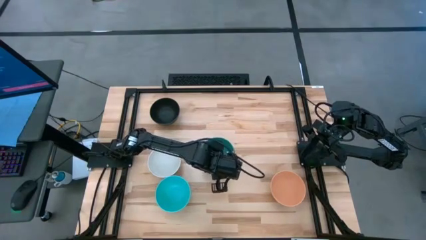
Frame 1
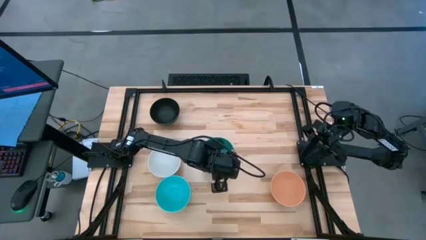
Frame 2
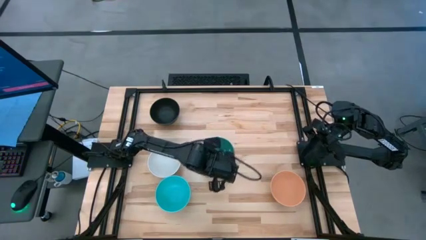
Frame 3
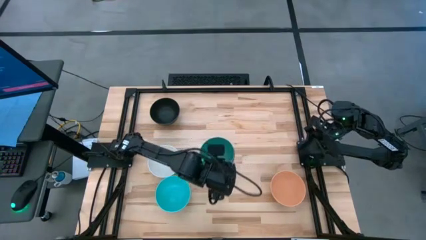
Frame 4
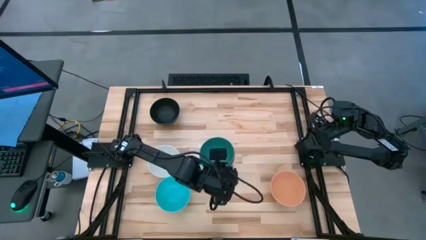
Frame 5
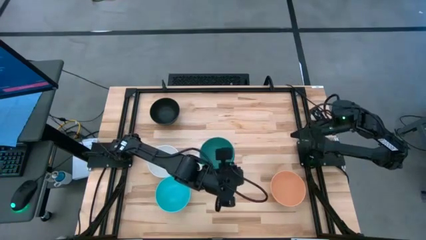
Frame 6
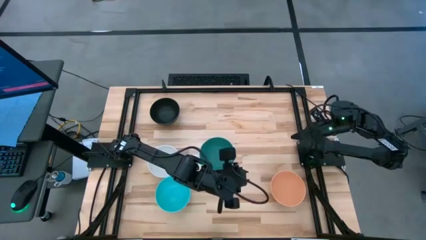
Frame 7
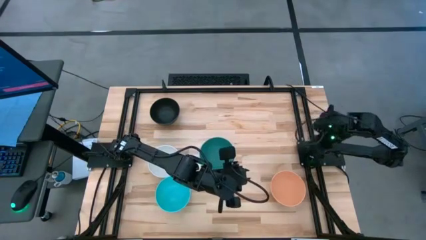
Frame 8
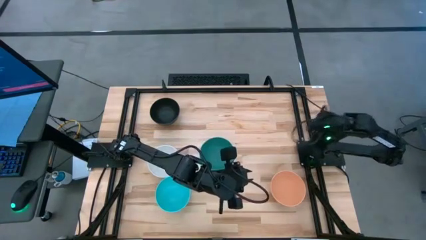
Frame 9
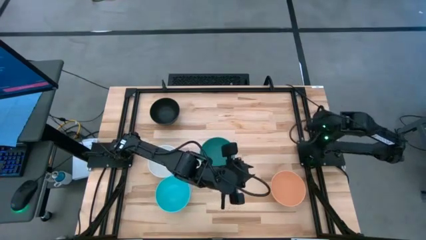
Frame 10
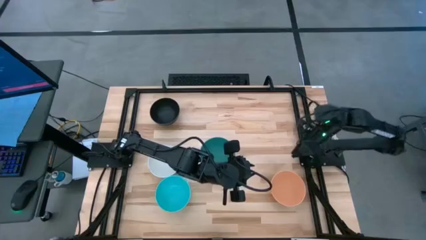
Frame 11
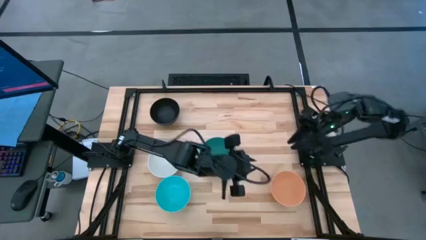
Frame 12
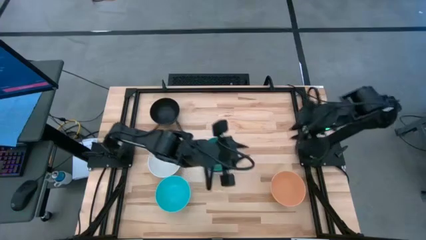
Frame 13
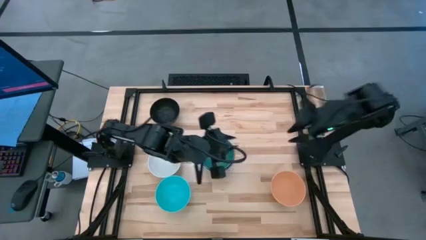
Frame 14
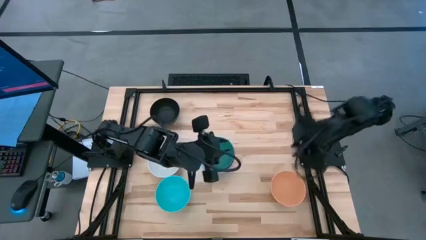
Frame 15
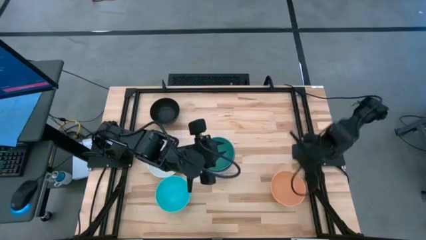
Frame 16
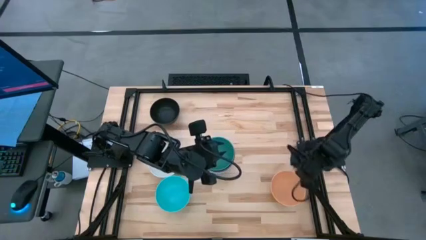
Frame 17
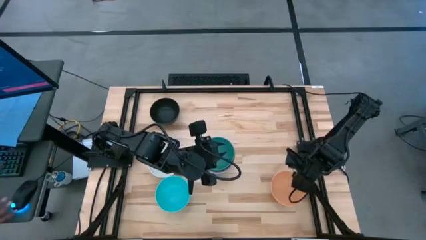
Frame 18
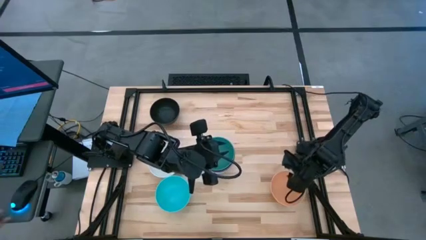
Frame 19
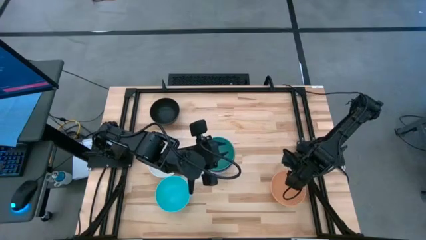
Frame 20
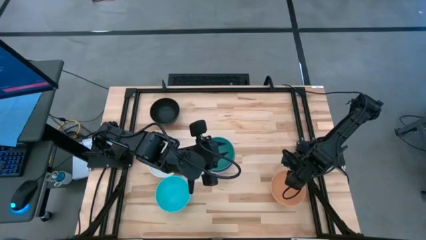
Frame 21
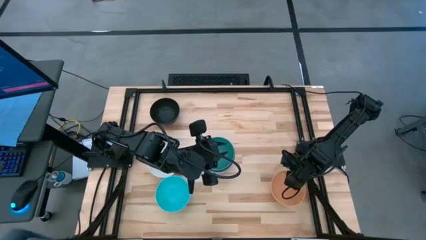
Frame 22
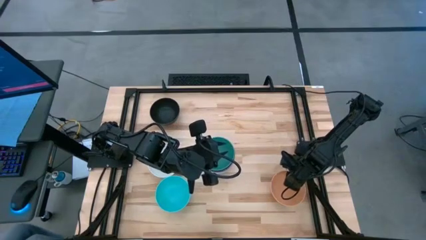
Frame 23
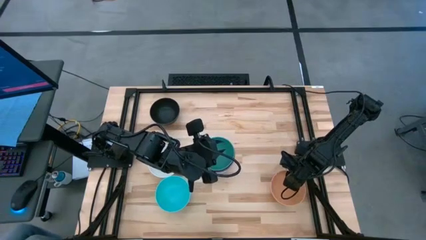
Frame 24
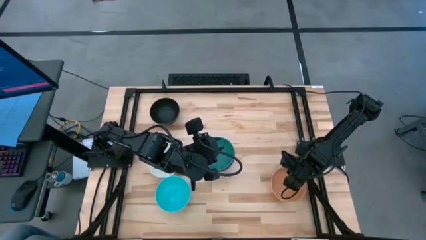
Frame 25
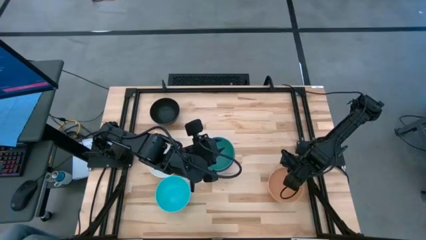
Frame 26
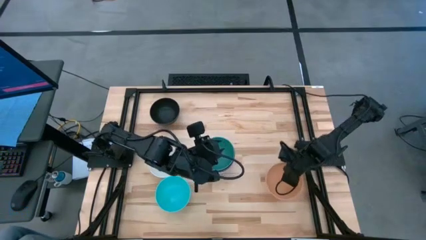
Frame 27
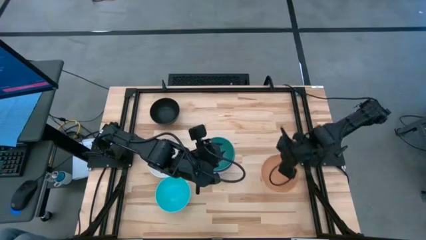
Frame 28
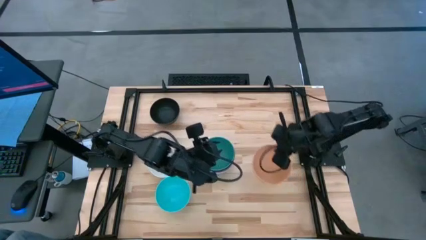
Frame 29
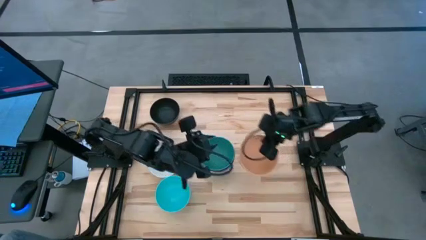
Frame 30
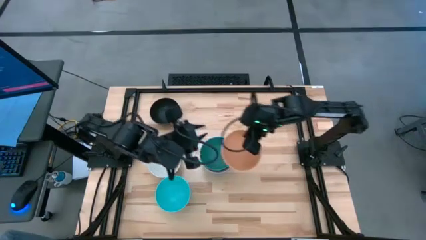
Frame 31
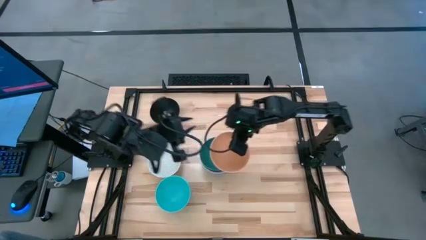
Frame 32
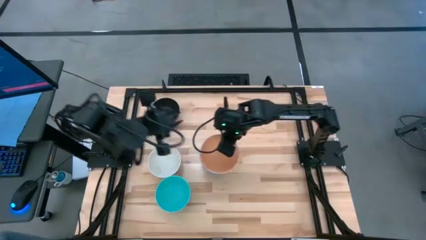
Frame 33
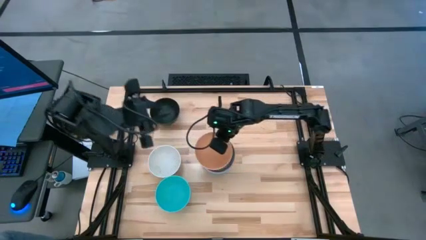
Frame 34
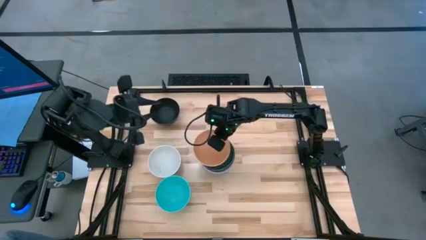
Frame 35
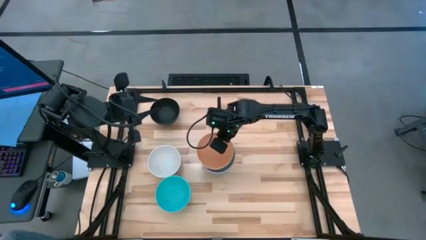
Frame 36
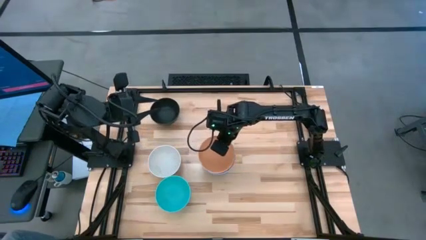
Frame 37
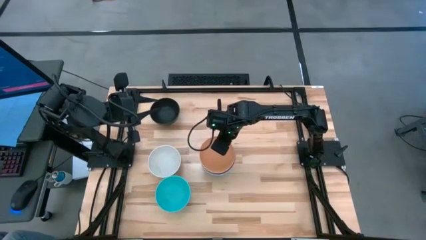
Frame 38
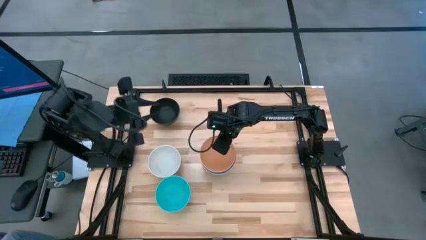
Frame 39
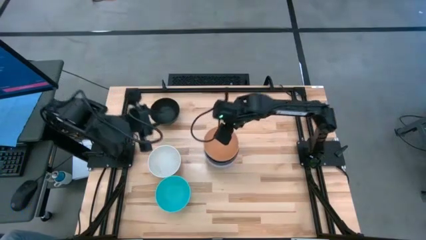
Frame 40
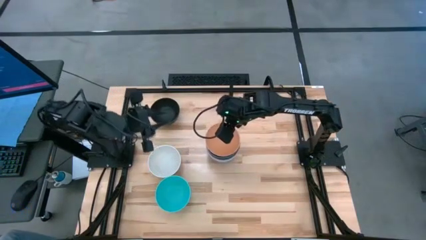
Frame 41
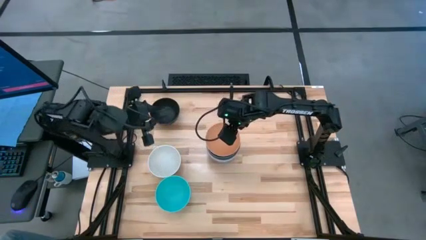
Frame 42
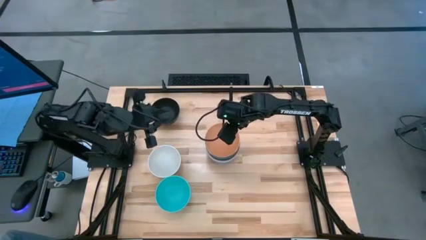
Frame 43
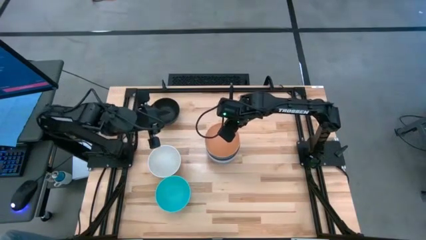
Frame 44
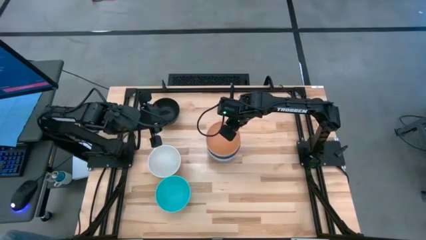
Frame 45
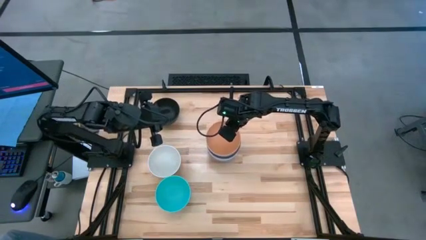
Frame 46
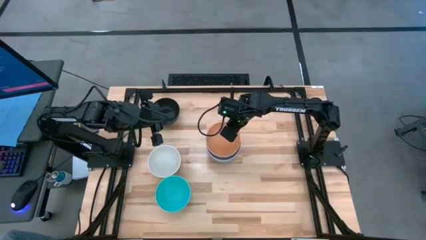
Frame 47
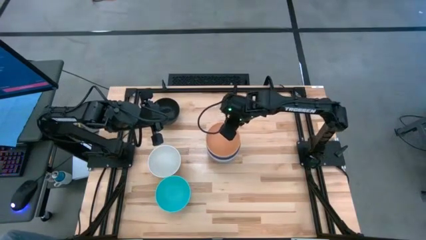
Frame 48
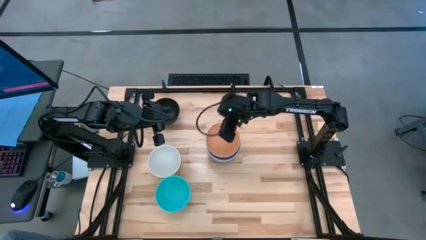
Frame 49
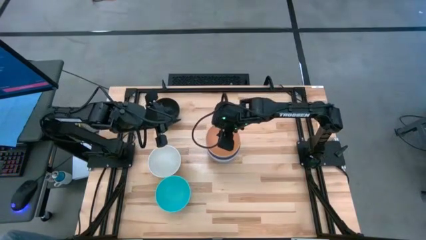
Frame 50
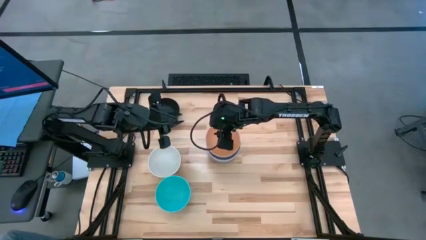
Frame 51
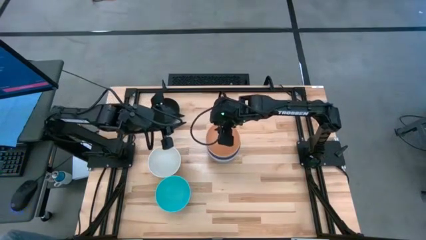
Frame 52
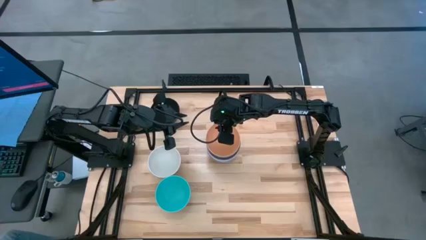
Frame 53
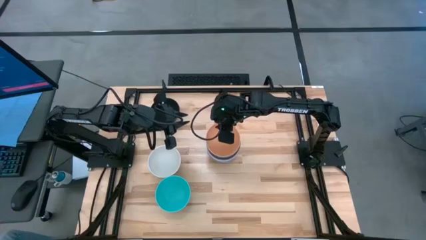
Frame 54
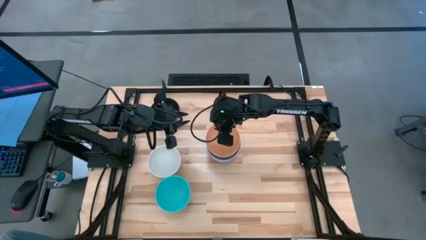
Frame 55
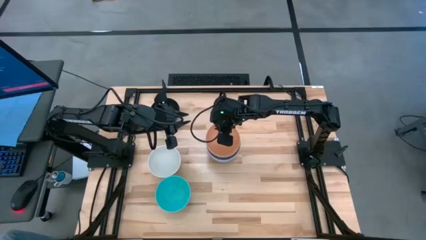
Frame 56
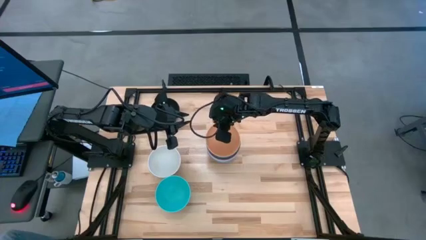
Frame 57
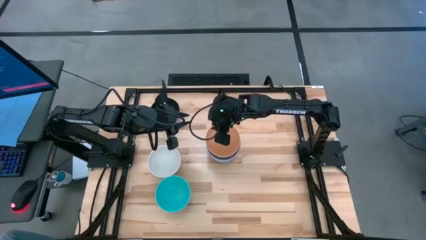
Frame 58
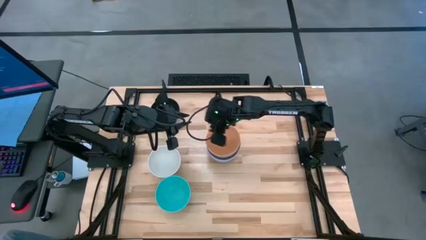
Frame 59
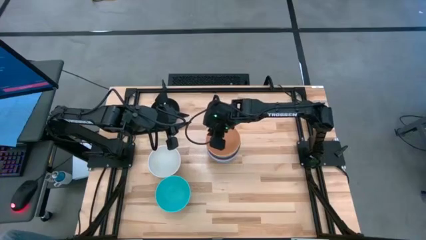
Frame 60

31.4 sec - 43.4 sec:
Task: Nest bowls inside each other
Stack the orange bowl on top of the green bowls

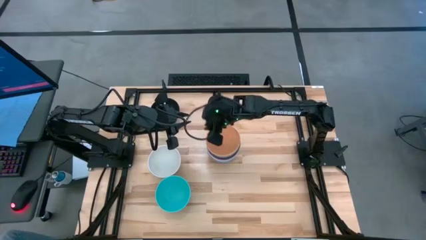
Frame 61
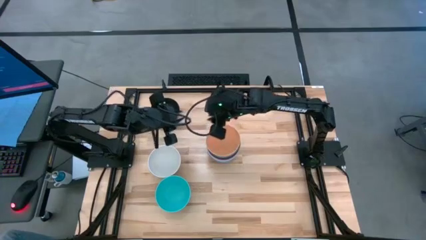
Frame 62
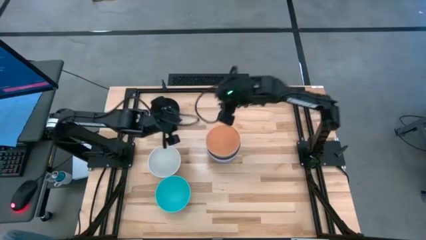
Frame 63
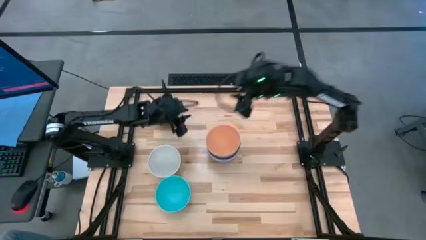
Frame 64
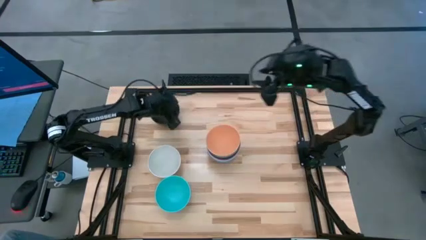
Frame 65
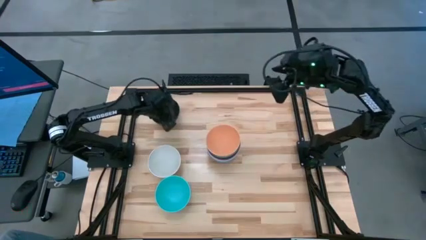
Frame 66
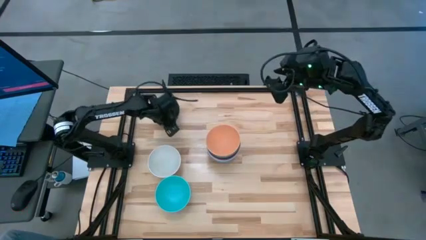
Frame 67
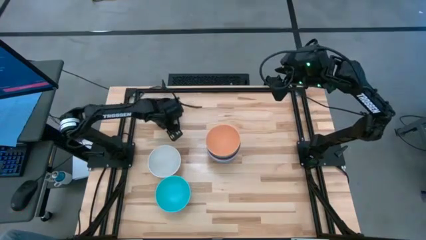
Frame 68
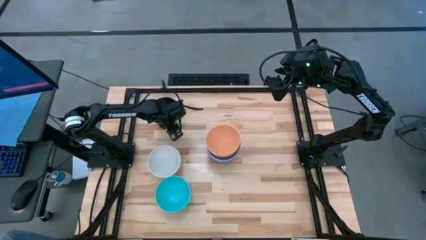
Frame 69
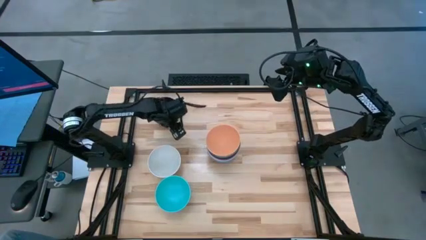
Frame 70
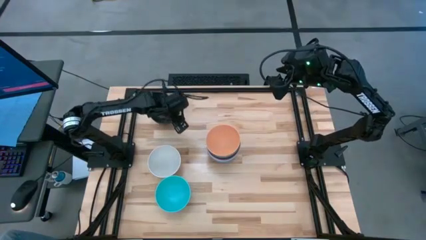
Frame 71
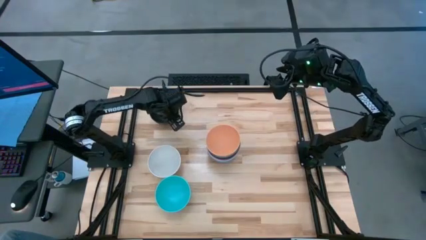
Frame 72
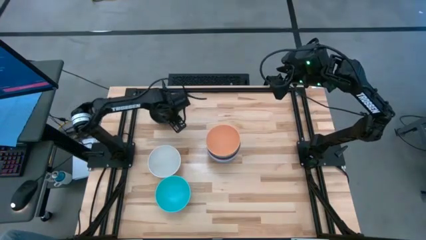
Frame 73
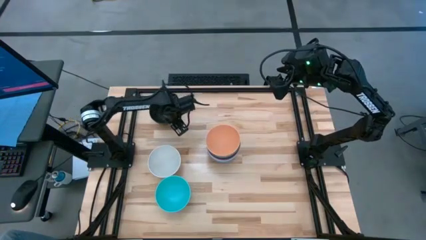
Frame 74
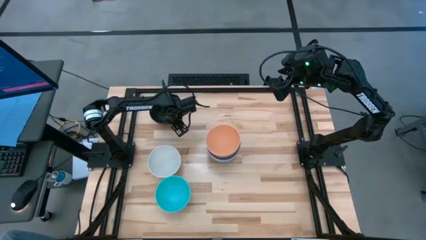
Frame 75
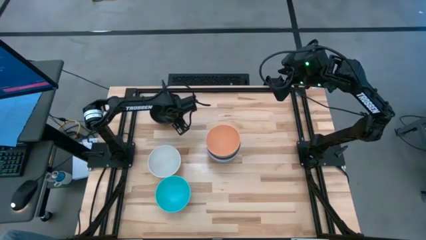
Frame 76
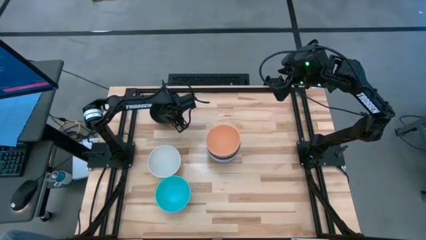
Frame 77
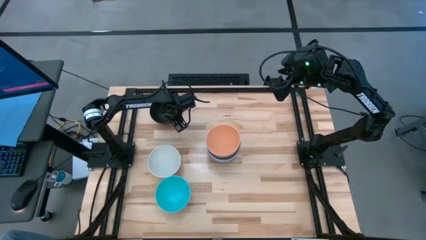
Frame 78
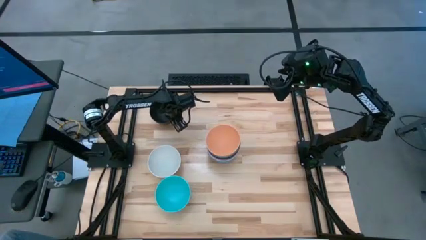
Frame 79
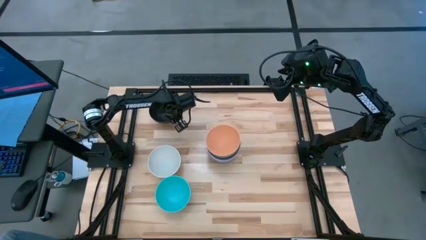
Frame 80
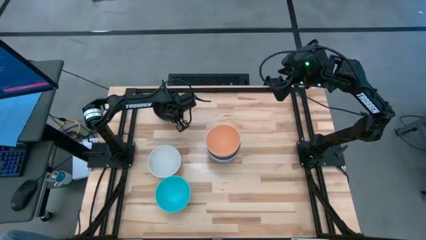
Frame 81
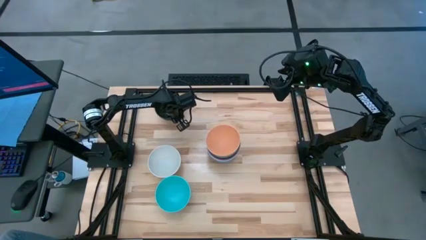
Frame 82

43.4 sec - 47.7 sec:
Stack the black bowl on top of the orange bowl

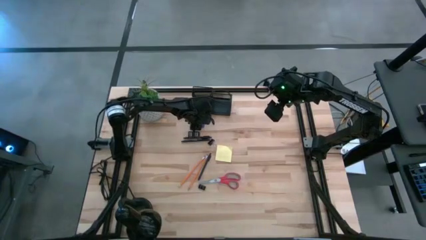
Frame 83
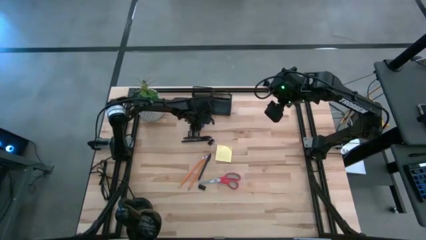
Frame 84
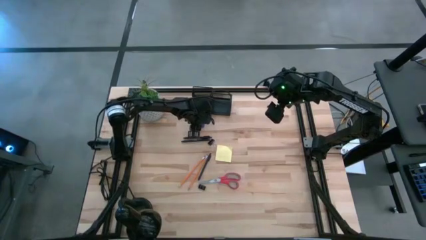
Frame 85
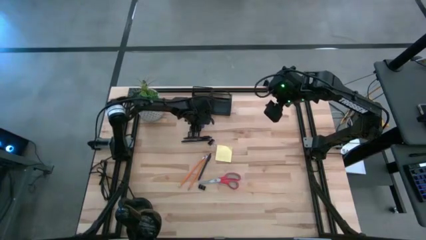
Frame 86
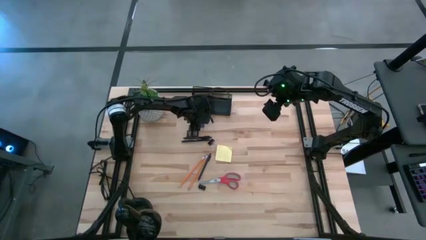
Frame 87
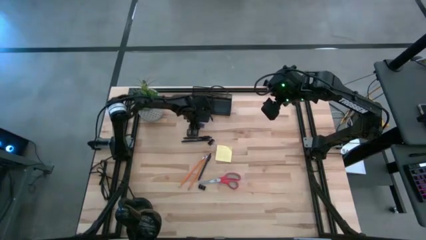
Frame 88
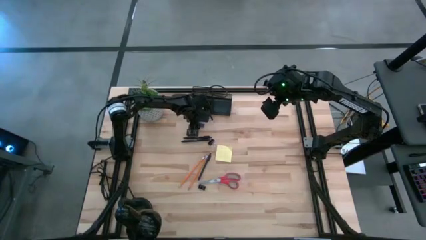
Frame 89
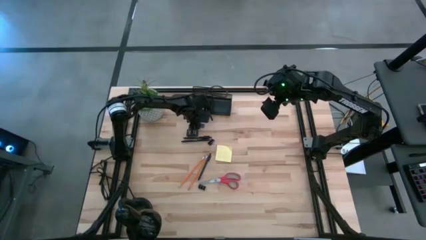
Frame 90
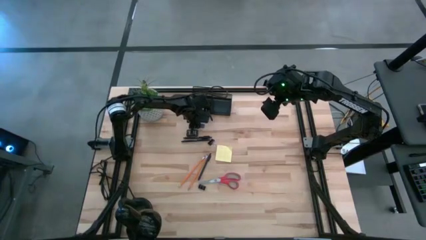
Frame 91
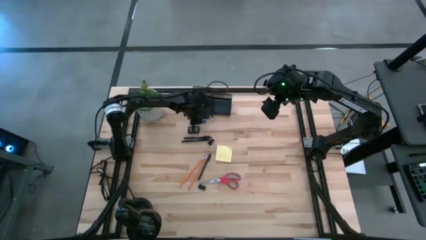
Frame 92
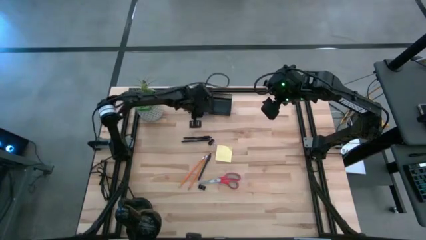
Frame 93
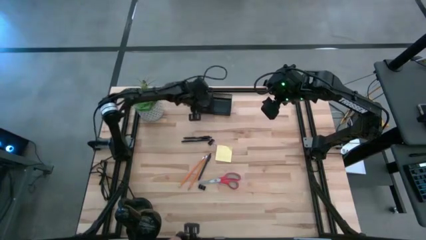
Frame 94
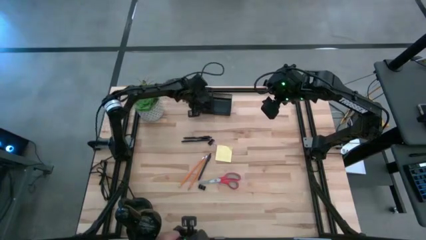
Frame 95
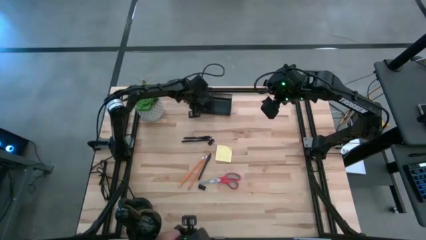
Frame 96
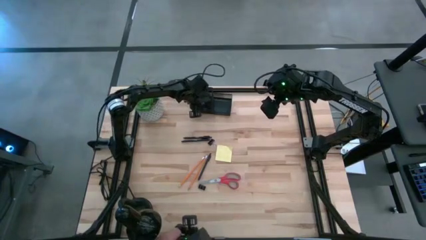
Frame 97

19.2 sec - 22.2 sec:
Task: Pick and place office supplies into organizer
Put the eraser into the bottom left section of black desk organizer
